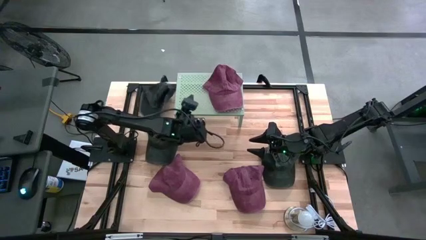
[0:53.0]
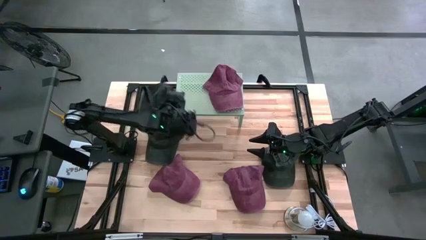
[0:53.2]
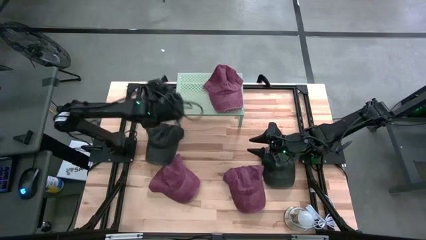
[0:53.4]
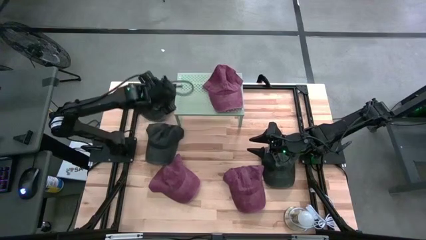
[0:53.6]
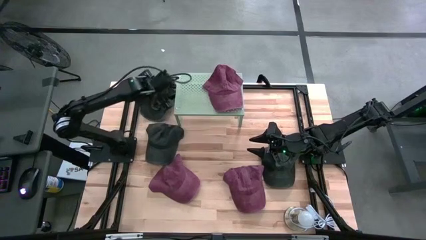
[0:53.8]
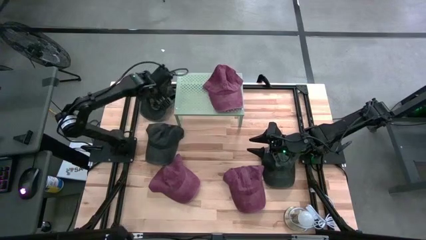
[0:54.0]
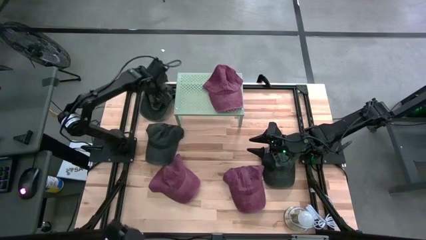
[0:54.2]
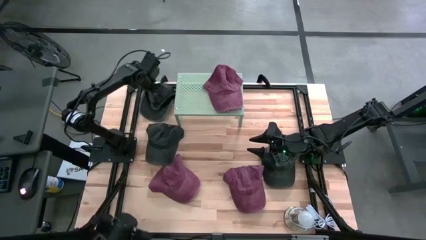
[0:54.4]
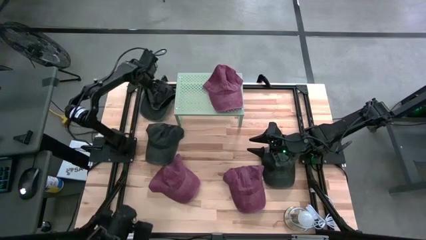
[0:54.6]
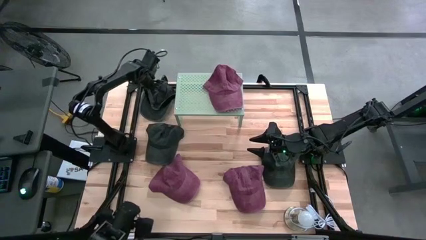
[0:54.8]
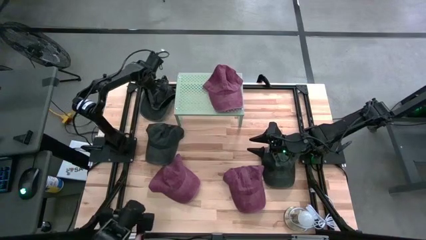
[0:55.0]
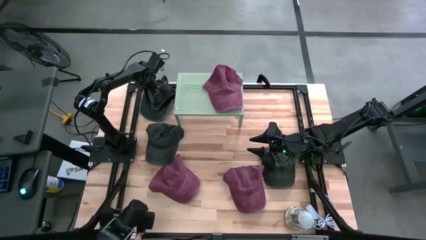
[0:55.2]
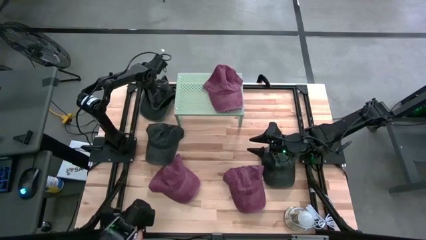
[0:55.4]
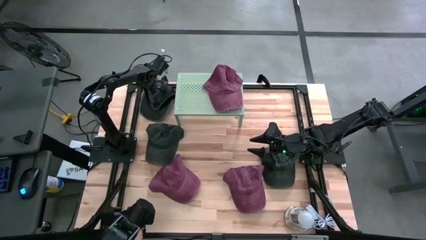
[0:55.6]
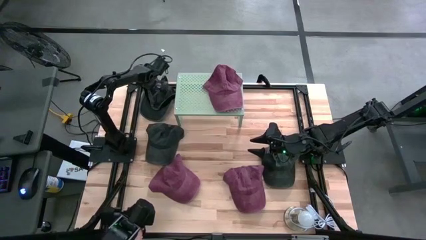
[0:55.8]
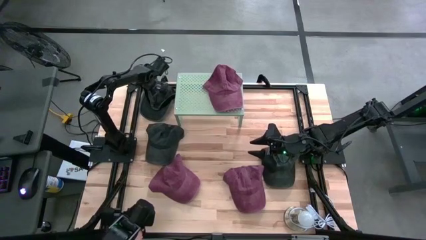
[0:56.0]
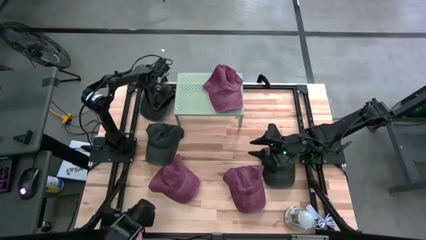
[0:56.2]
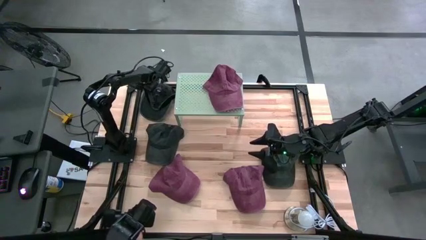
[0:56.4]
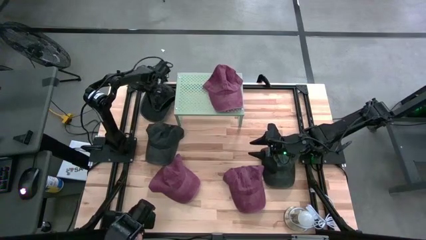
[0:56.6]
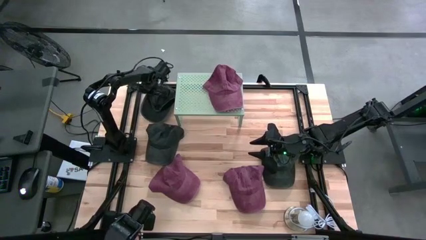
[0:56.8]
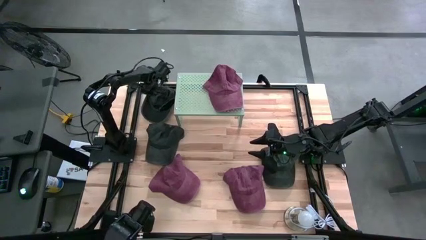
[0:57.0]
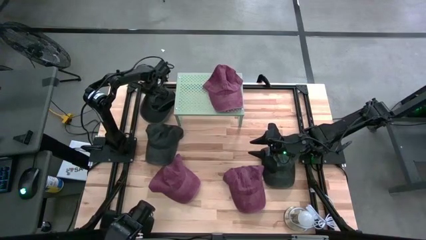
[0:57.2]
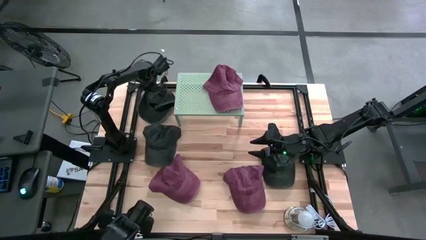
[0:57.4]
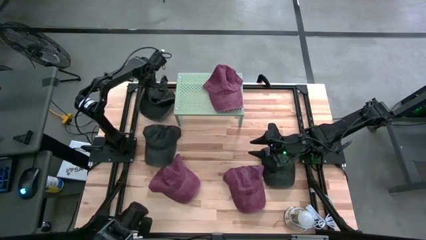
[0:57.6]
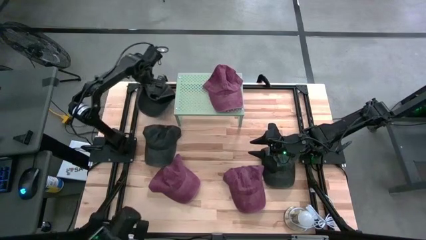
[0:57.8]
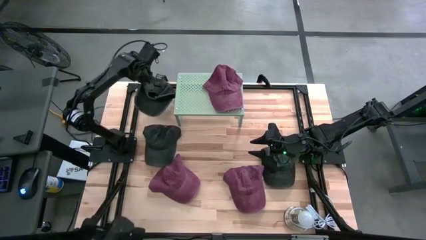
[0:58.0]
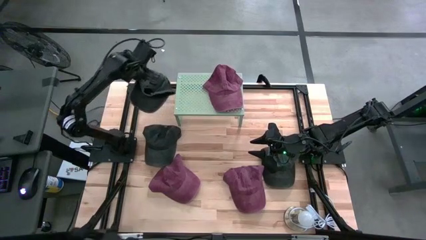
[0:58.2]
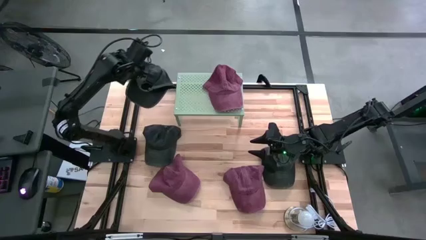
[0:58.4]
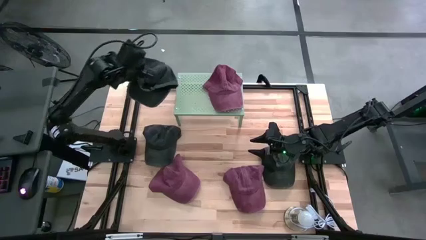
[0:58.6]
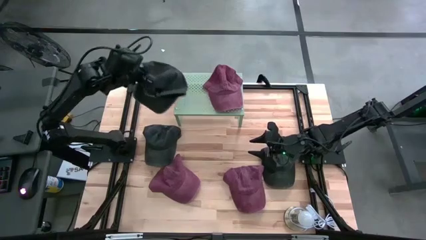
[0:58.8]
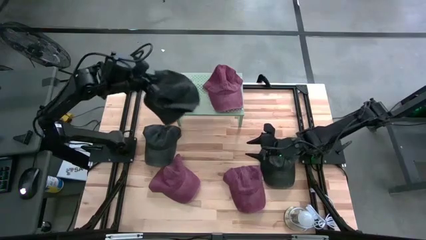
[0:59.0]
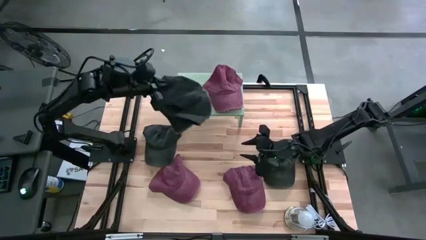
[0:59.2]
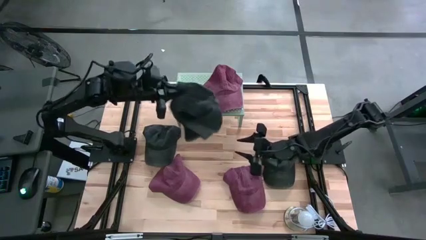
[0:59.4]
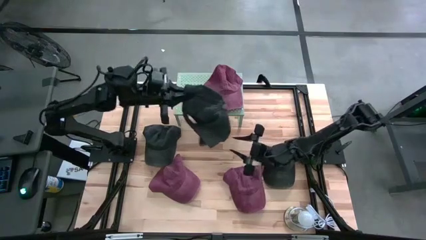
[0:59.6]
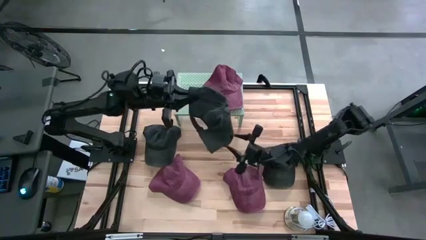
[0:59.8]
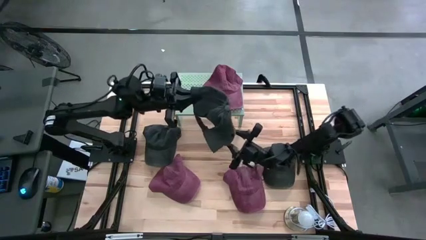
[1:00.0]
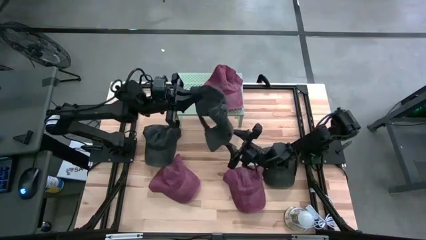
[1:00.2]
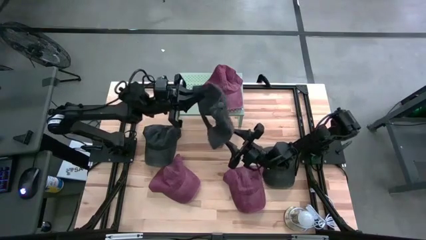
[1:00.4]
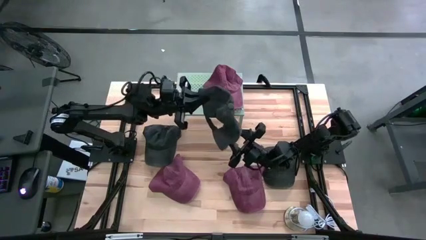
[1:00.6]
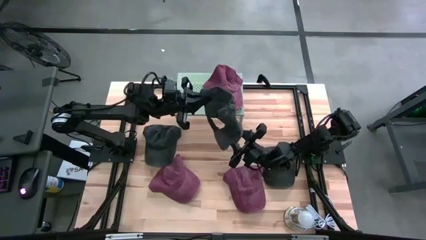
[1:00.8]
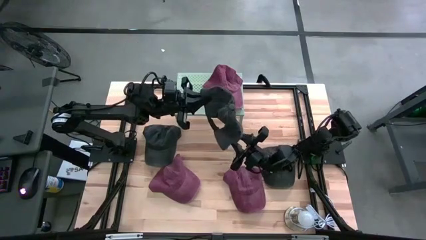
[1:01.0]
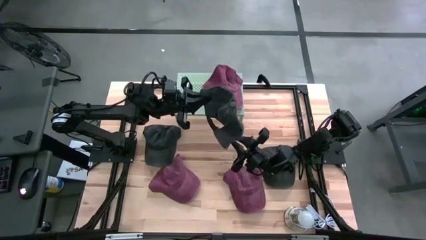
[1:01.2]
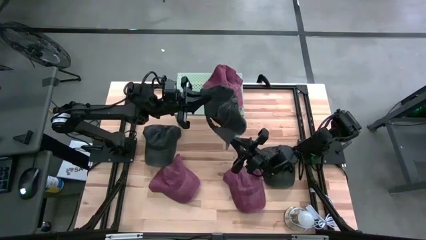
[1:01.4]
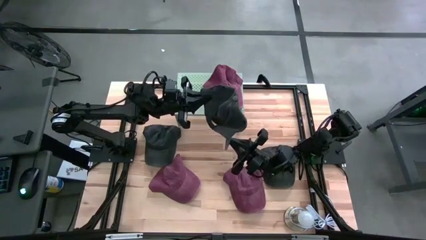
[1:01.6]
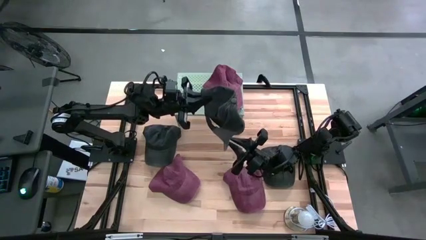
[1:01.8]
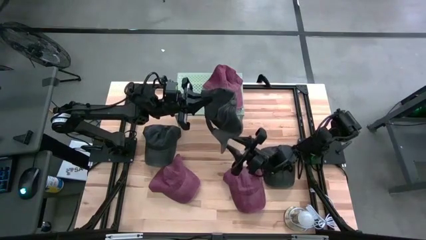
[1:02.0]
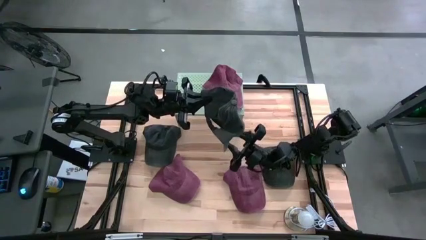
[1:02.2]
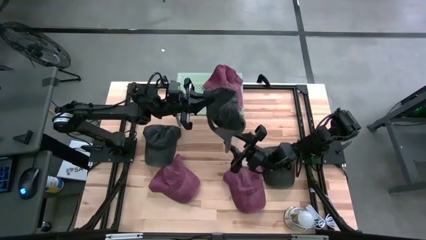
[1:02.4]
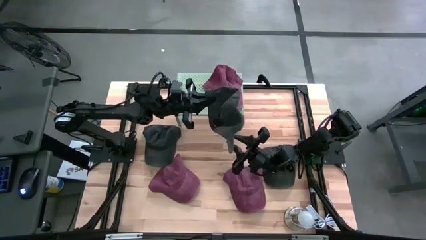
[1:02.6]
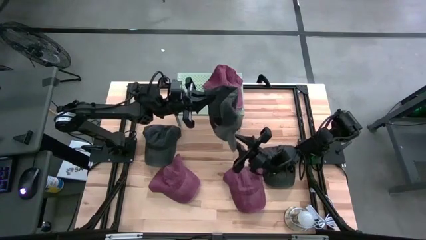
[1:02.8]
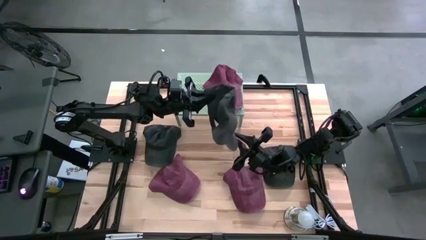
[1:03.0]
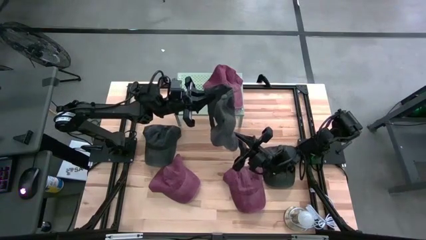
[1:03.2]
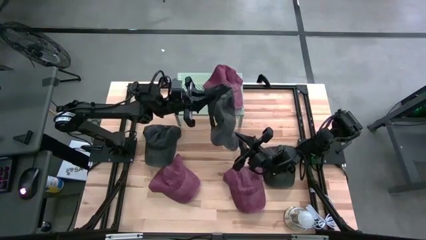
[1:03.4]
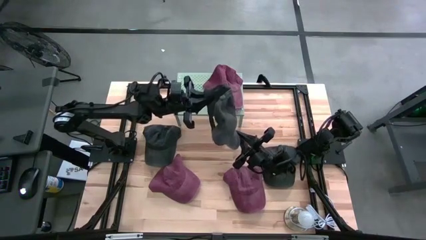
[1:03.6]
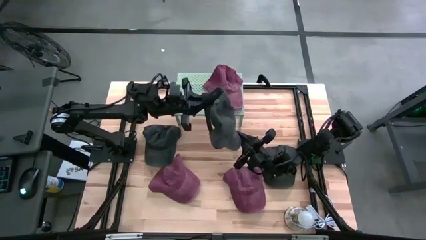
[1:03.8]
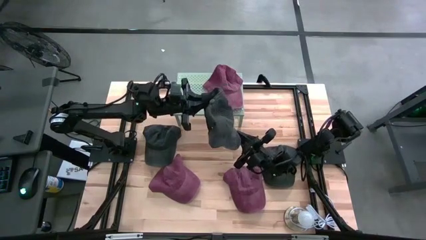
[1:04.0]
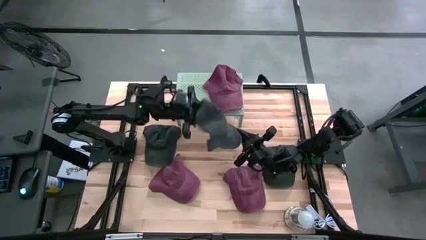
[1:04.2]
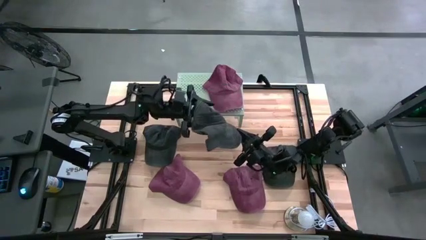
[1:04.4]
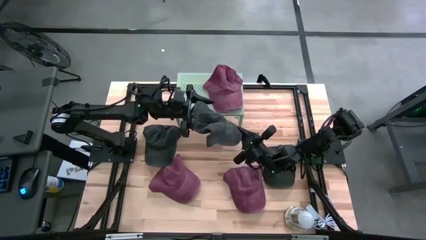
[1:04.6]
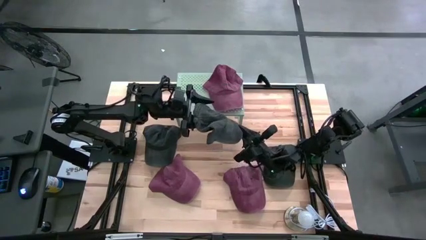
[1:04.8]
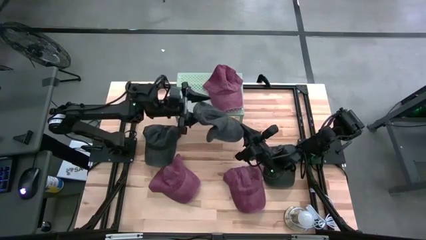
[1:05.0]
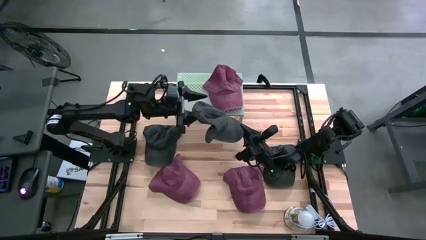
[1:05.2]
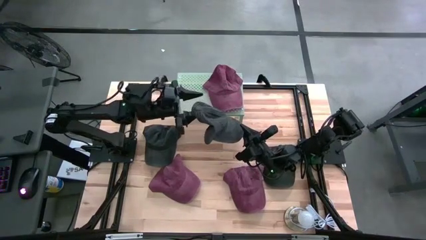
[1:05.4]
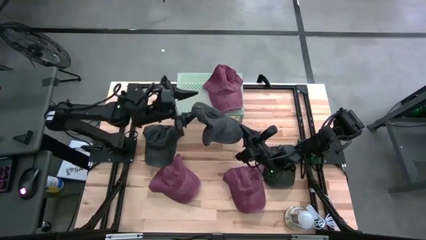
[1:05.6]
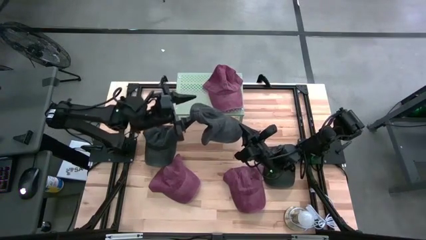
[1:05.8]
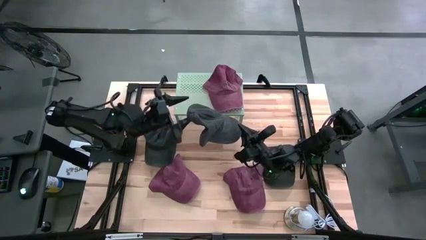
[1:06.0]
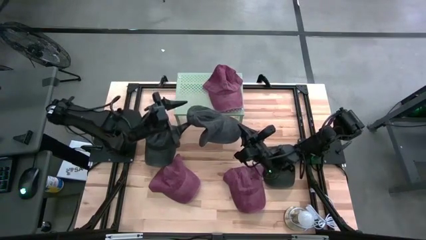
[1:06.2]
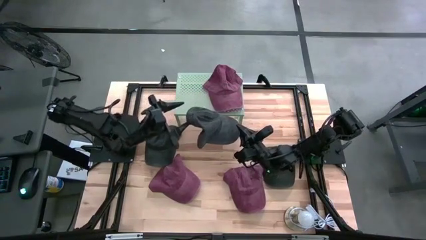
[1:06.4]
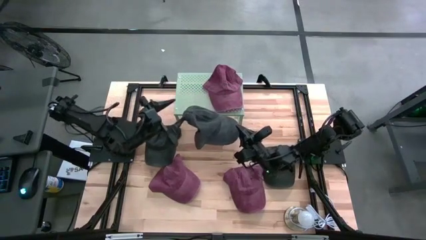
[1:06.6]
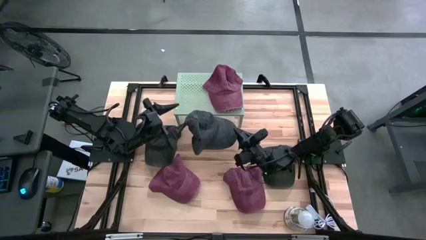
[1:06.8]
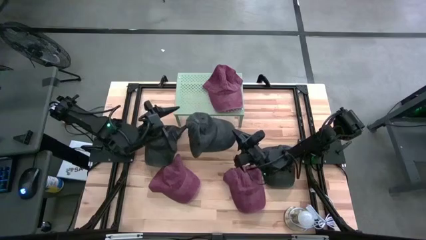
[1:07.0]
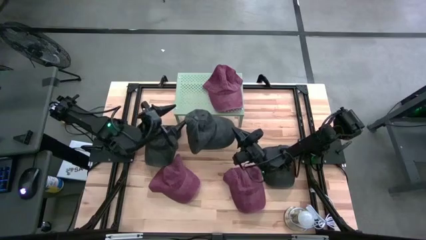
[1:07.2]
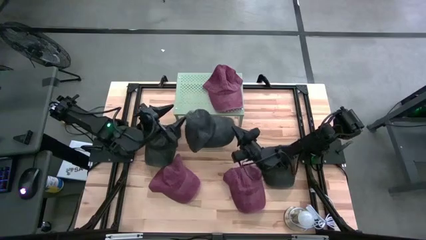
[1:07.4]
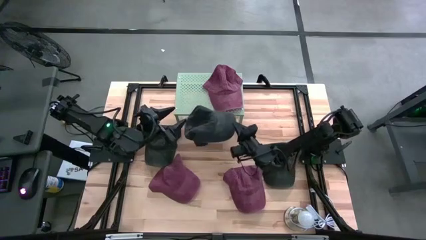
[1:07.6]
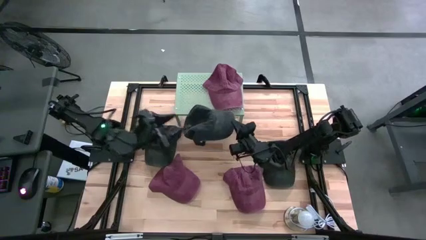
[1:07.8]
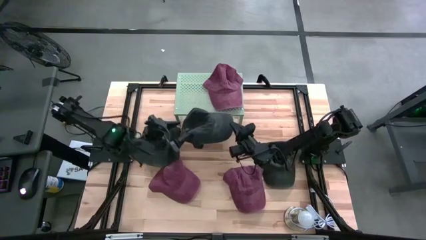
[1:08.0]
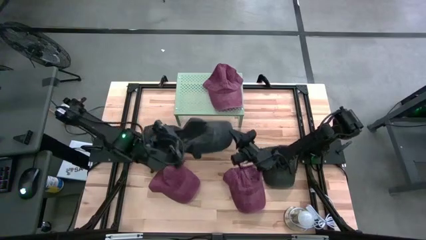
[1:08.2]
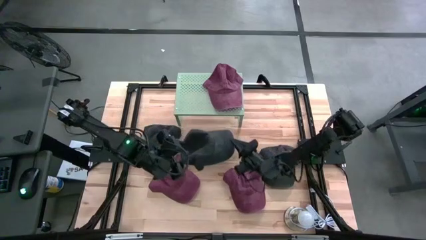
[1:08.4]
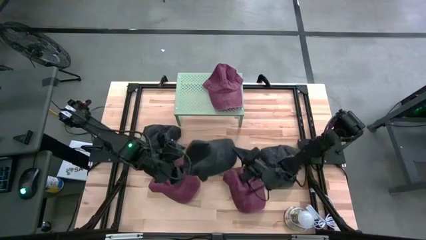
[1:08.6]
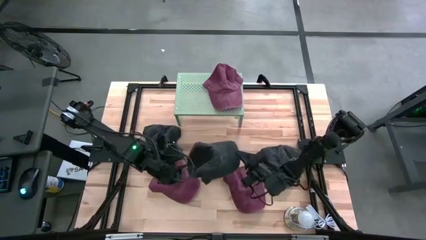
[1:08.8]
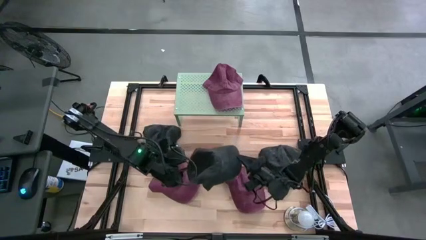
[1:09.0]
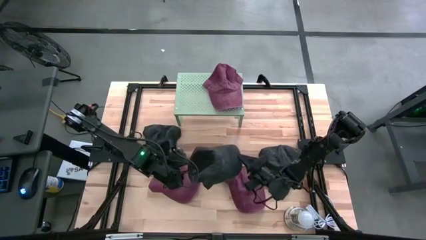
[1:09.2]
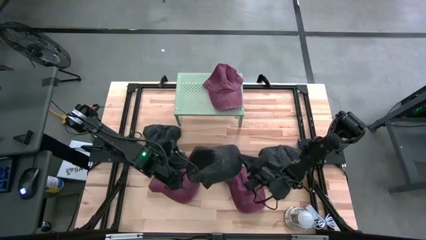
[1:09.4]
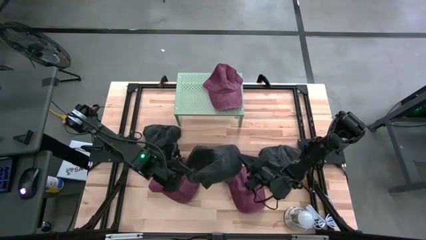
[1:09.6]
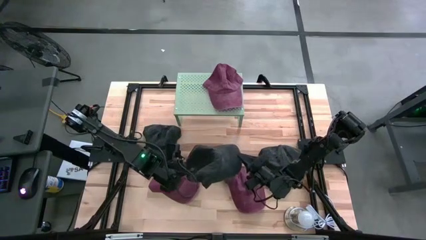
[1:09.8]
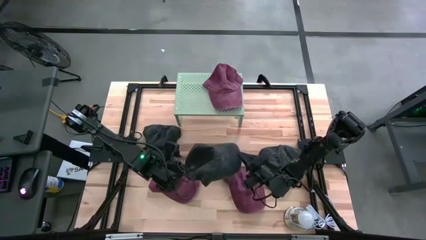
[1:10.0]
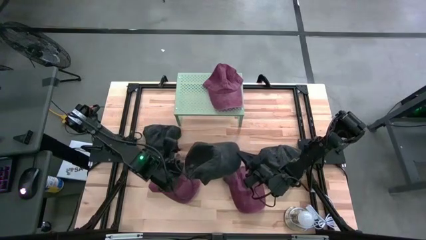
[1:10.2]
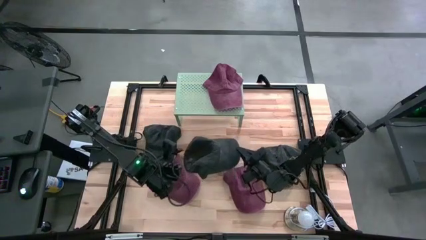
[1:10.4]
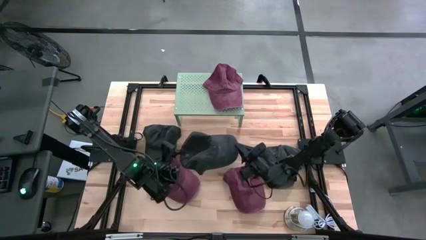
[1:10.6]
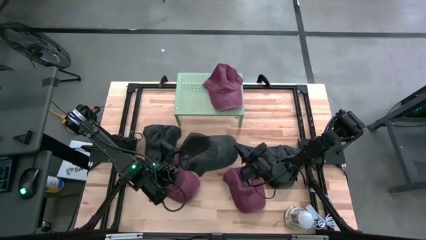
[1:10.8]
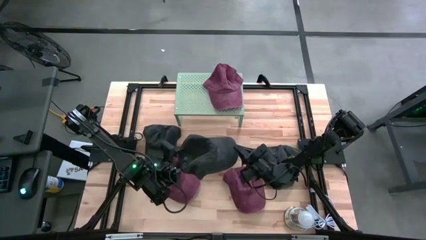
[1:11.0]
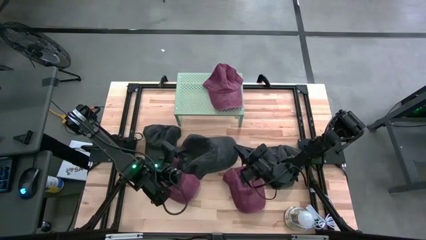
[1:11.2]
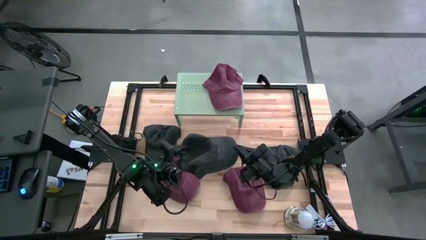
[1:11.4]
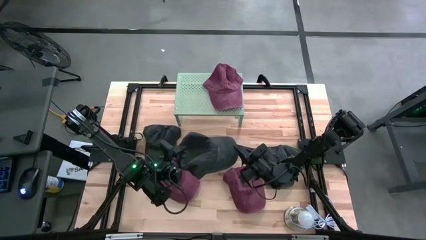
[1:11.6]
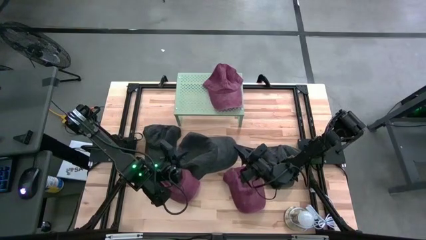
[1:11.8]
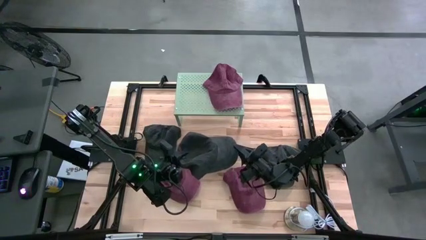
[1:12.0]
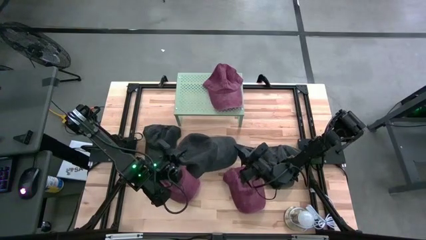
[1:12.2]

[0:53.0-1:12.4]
Task: Pick & Place hat
Put the top left black cap on the left side of the shelf
